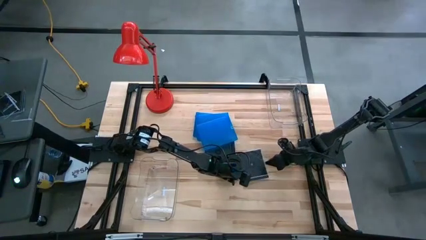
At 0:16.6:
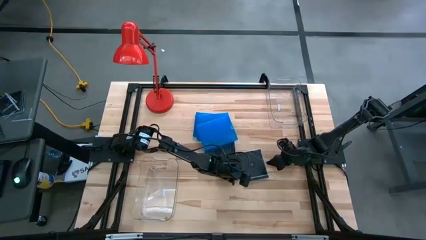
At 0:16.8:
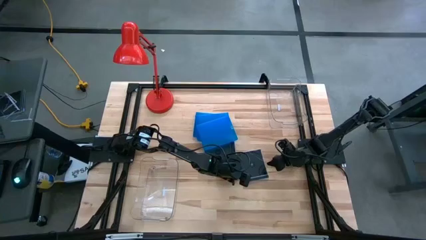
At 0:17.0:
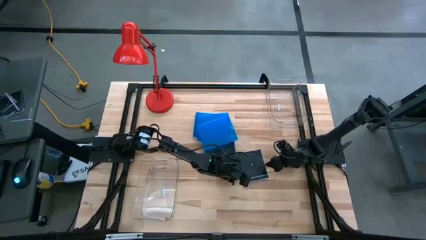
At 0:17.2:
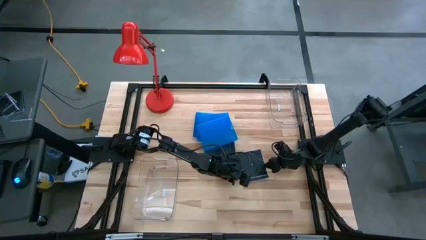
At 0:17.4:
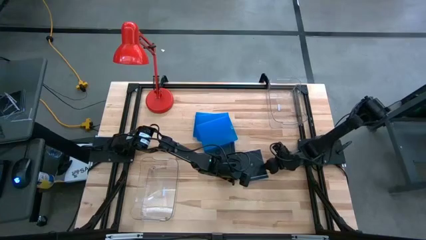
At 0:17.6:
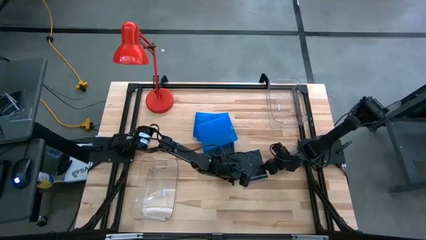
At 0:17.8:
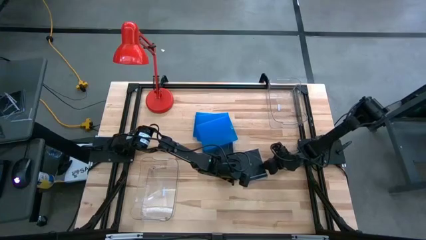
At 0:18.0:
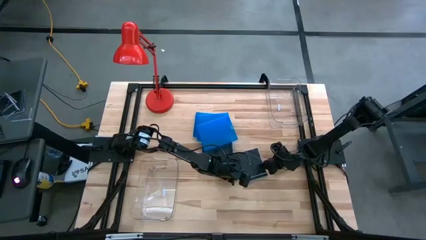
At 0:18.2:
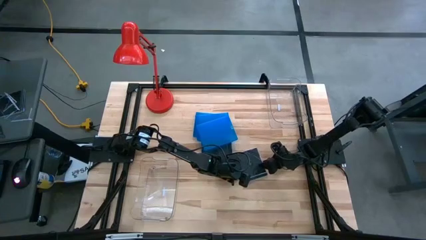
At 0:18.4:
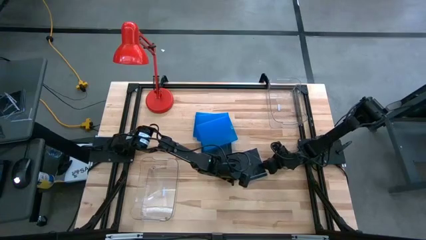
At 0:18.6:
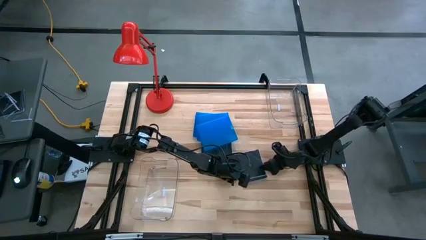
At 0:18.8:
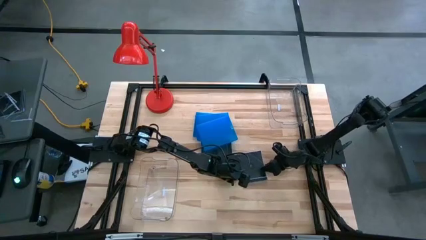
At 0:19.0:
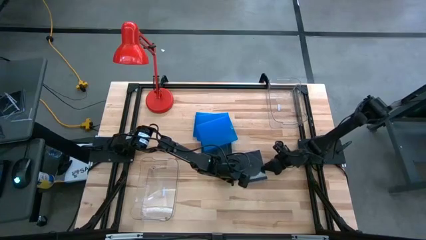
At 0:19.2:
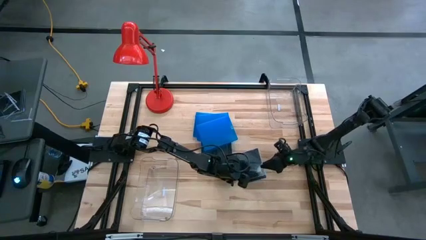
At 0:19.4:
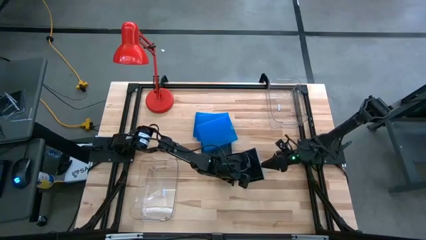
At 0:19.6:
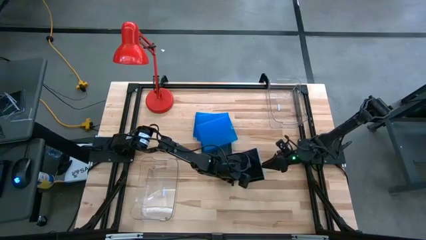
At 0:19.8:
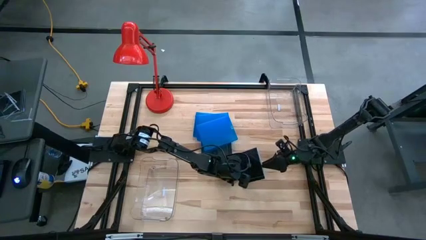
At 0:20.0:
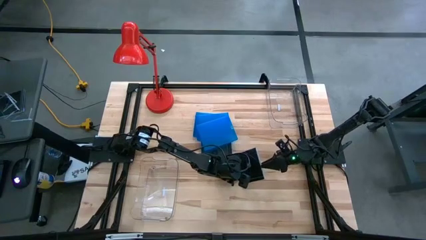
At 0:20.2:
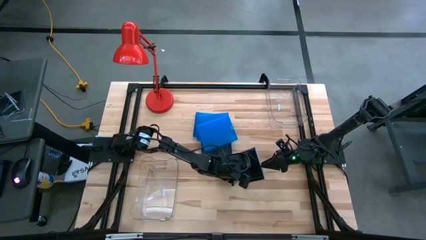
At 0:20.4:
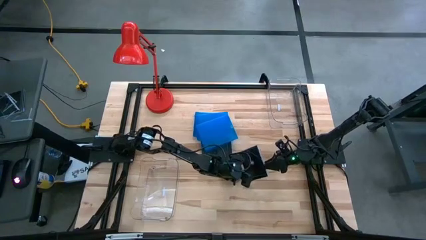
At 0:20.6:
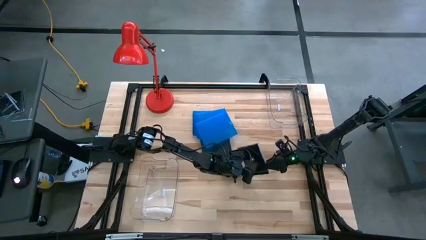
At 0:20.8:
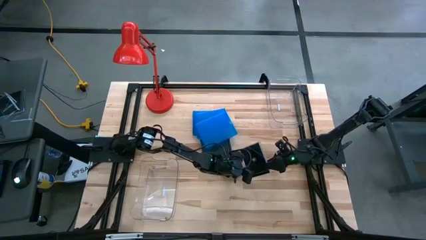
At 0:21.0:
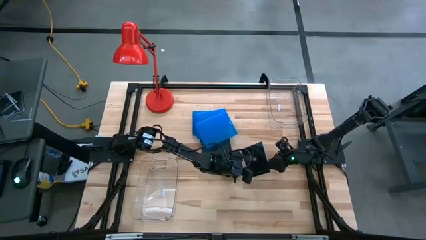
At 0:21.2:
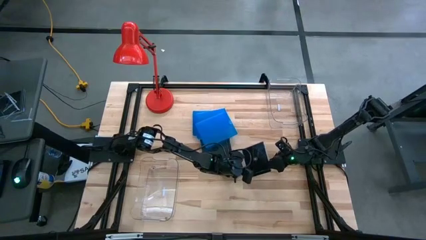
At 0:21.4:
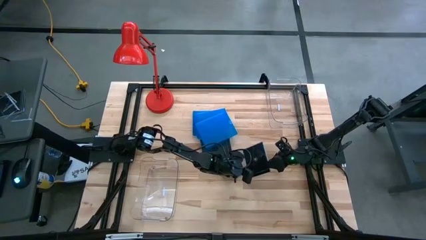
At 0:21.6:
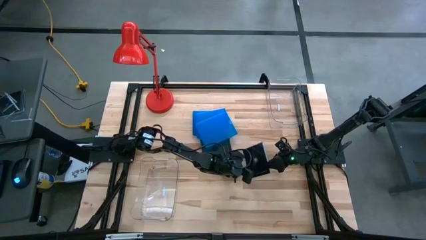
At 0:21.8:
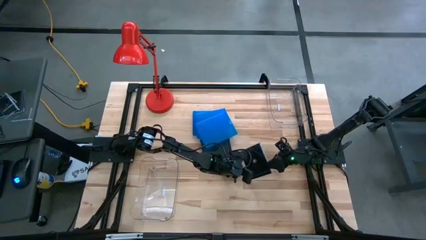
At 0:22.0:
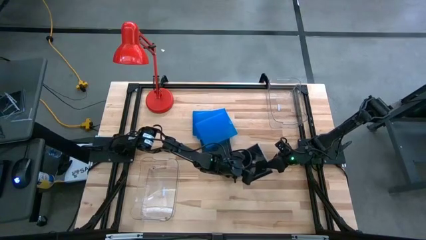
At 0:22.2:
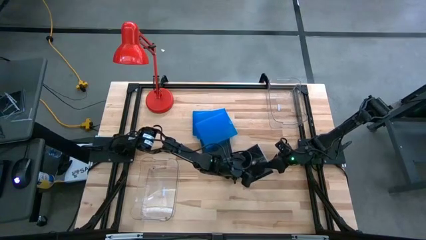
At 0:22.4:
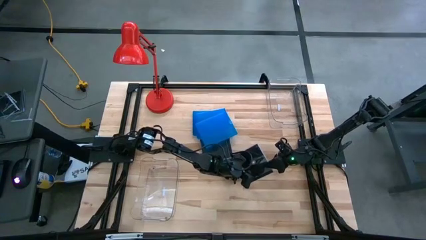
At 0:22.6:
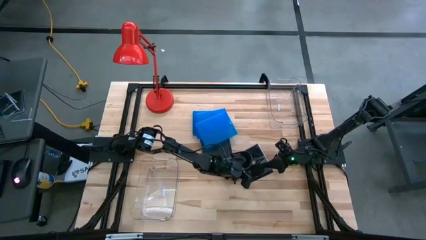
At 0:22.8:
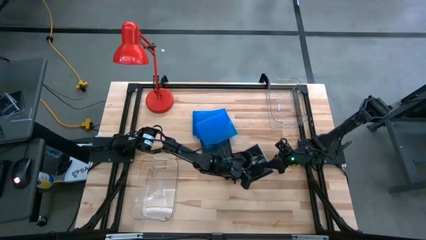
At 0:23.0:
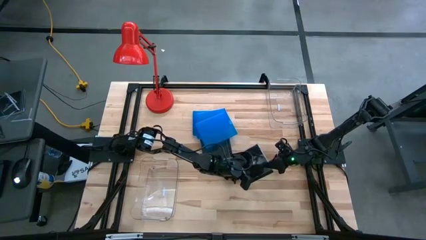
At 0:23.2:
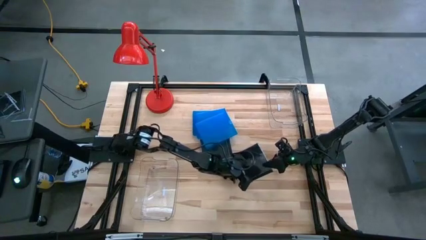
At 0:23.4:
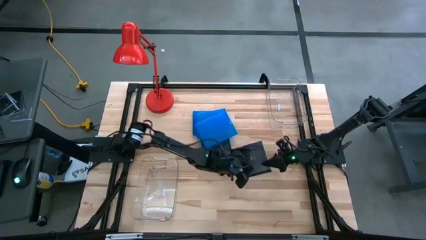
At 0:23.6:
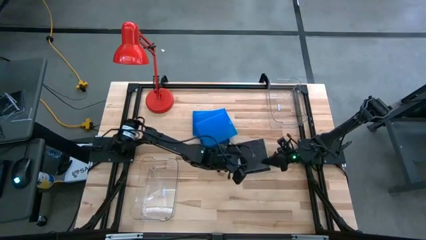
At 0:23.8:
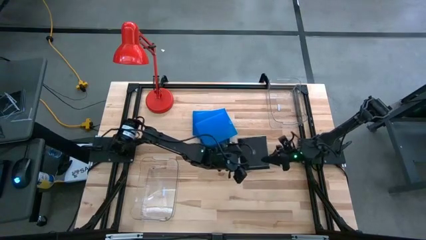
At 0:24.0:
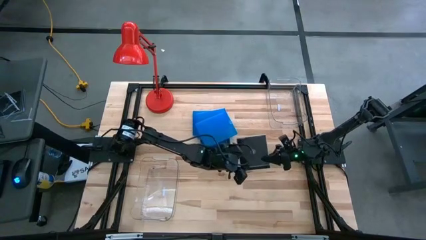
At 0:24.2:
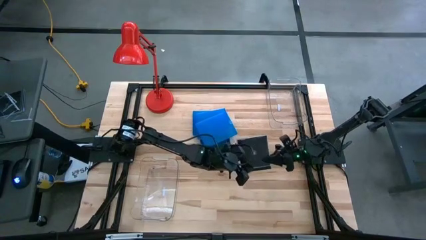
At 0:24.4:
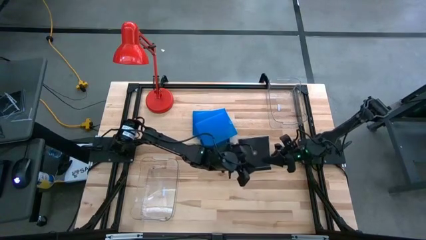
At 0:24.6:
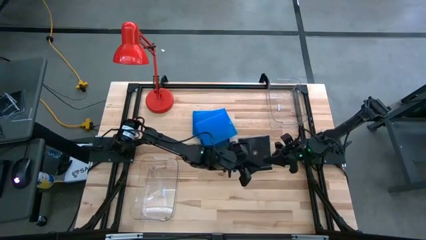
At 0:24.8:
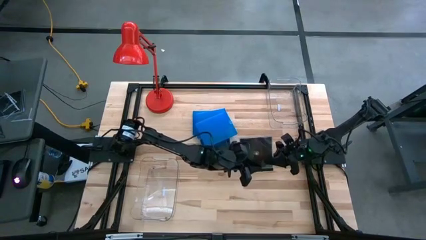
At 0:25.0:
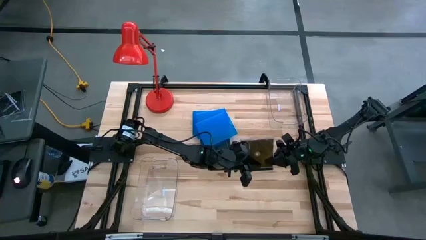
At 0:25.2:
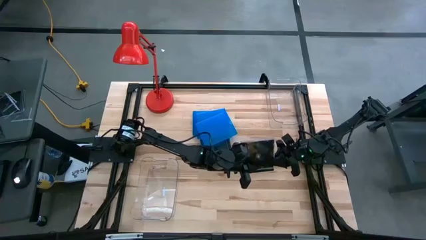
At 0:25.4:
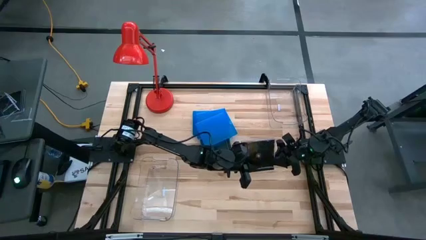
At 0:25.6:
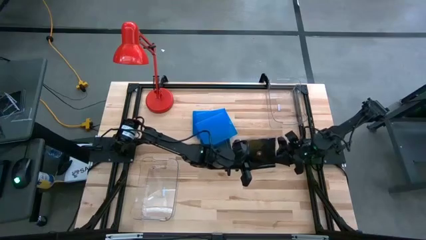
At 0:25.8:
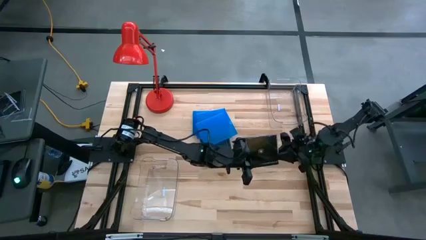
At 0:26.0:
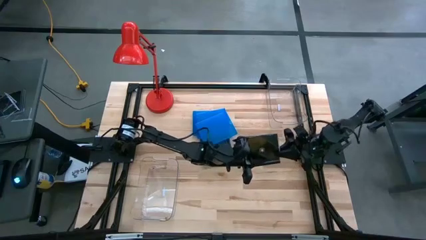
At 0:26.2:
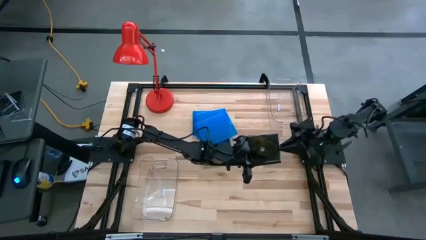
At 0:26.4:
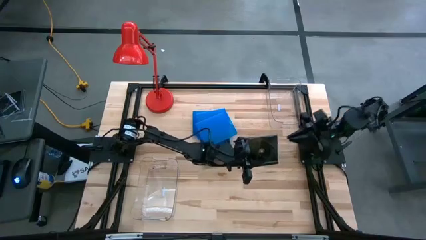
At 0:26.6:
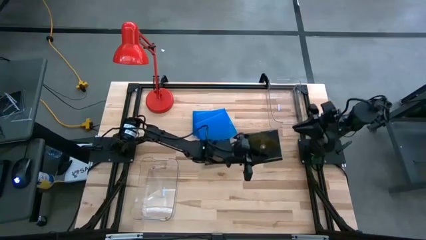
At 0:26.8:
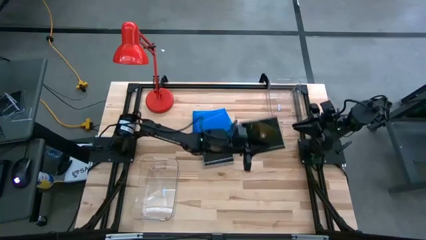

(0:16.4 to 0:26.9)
Task: Pick & place jewel cases by type
Put the black cd case into the bottom transparent bin
